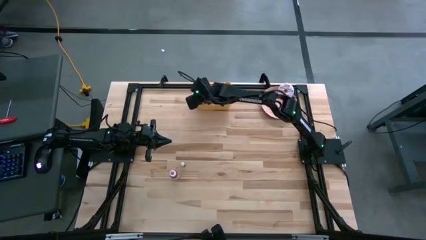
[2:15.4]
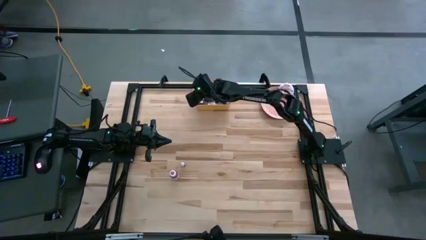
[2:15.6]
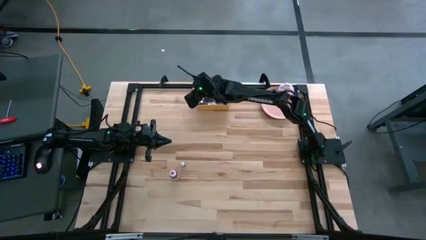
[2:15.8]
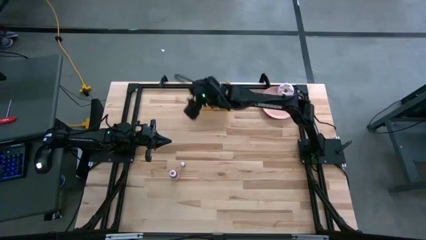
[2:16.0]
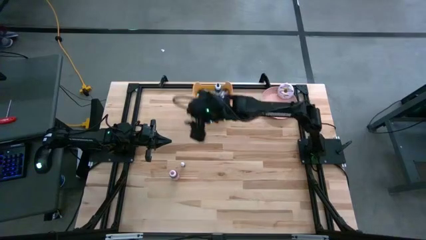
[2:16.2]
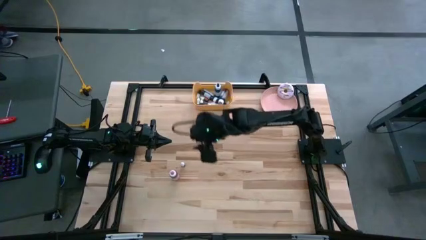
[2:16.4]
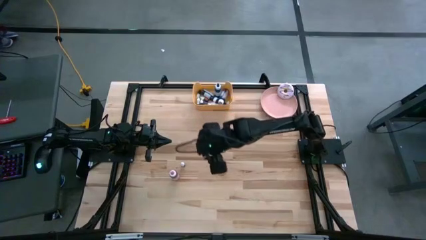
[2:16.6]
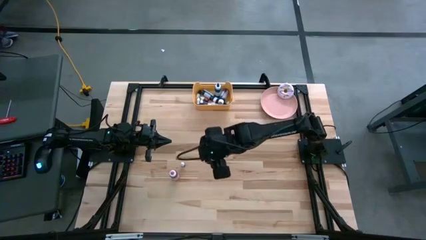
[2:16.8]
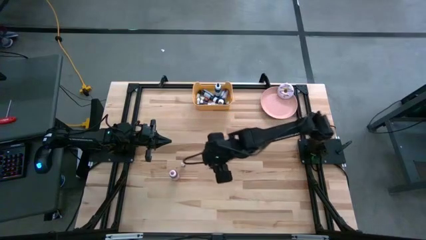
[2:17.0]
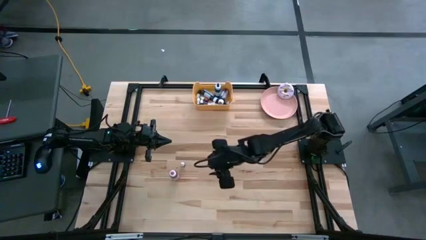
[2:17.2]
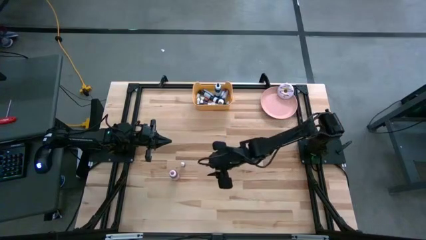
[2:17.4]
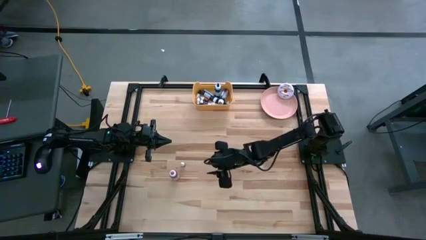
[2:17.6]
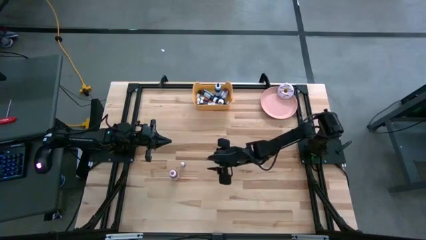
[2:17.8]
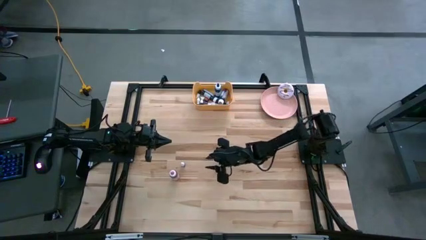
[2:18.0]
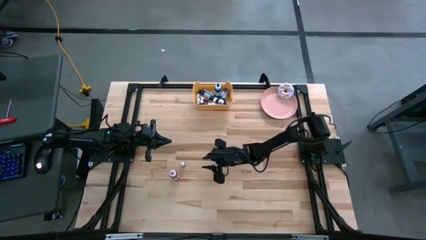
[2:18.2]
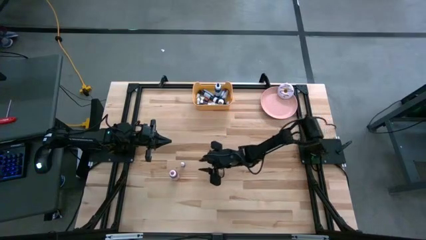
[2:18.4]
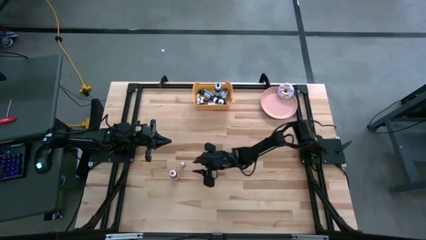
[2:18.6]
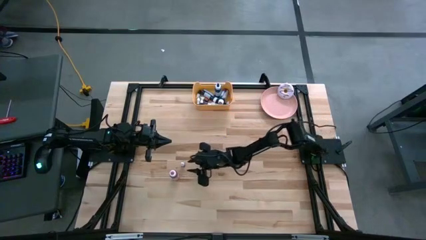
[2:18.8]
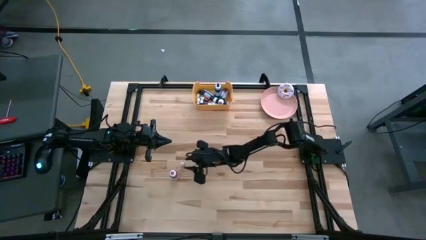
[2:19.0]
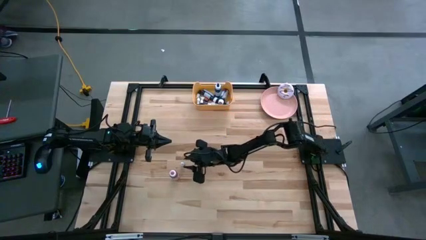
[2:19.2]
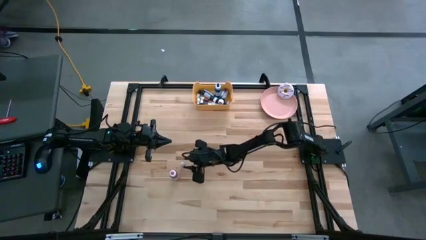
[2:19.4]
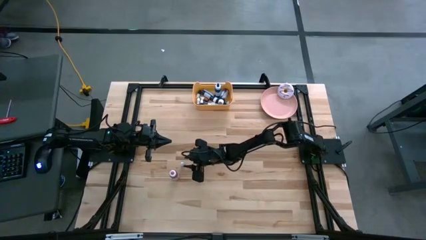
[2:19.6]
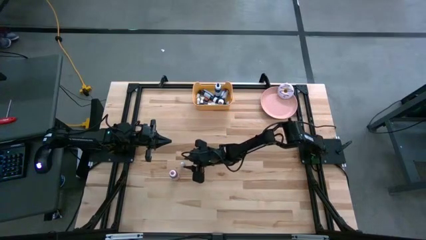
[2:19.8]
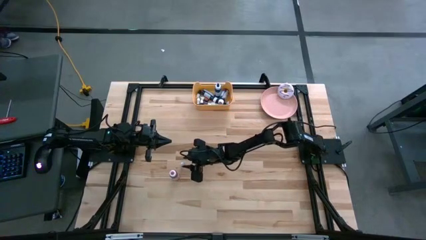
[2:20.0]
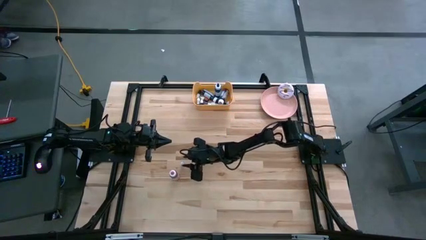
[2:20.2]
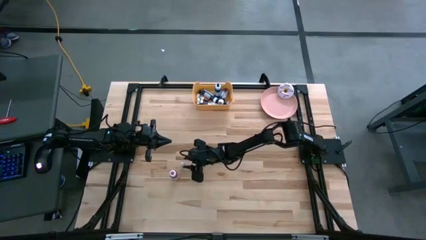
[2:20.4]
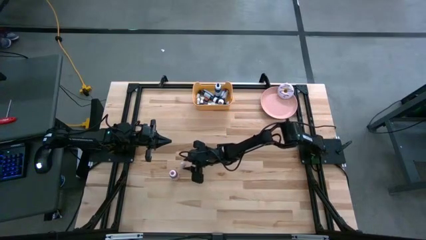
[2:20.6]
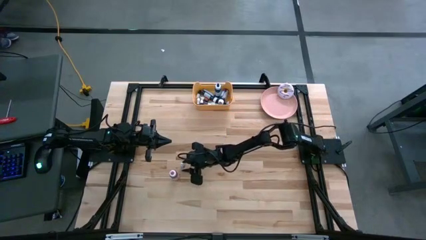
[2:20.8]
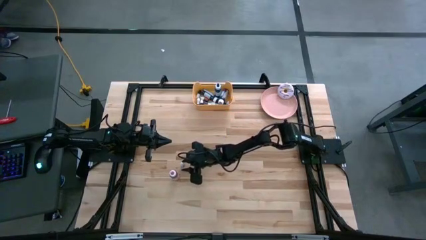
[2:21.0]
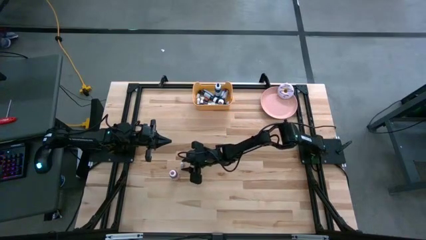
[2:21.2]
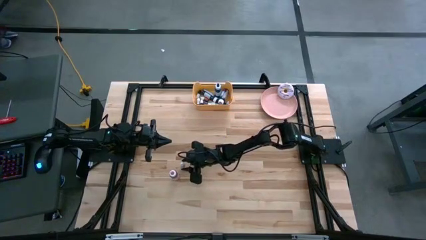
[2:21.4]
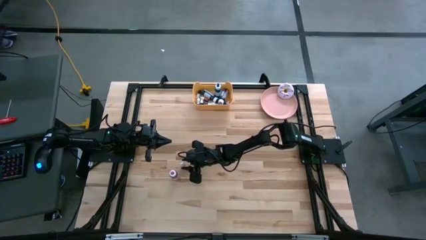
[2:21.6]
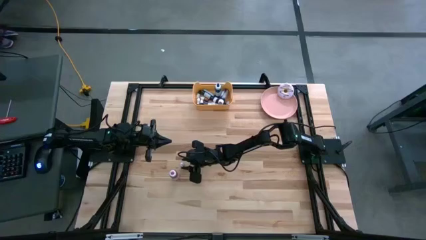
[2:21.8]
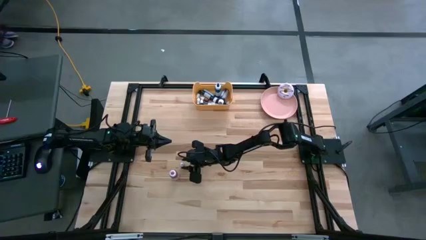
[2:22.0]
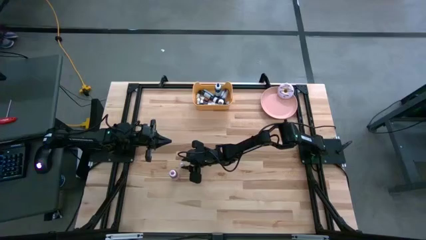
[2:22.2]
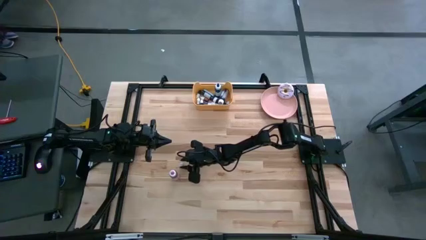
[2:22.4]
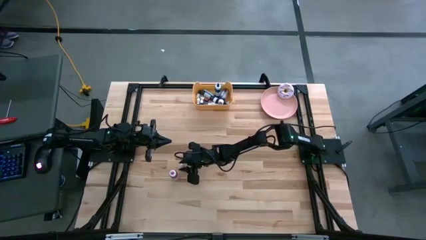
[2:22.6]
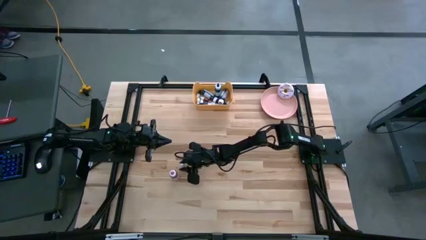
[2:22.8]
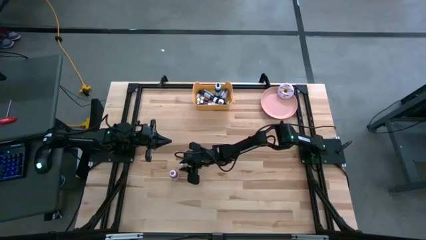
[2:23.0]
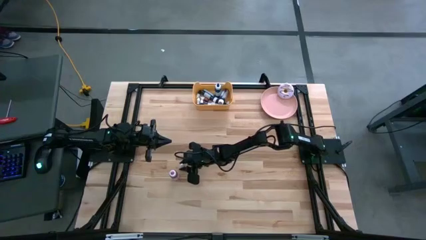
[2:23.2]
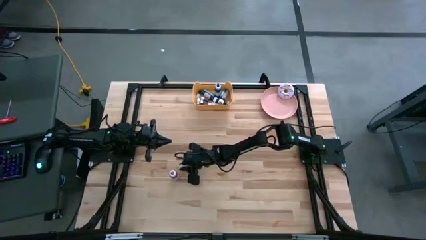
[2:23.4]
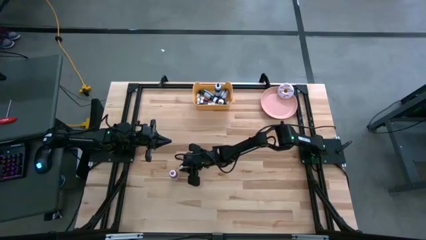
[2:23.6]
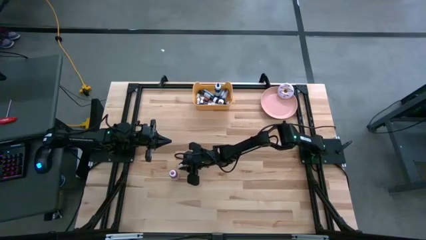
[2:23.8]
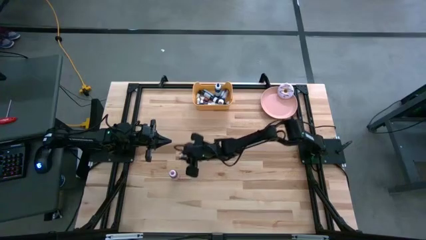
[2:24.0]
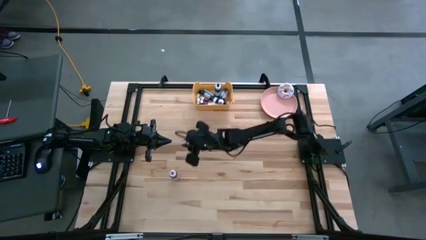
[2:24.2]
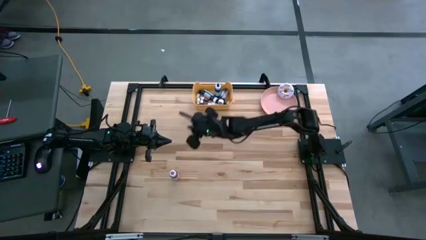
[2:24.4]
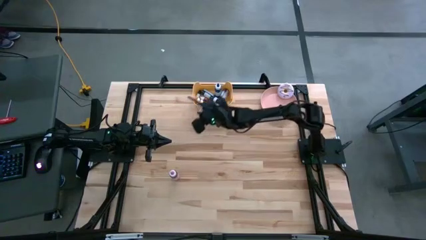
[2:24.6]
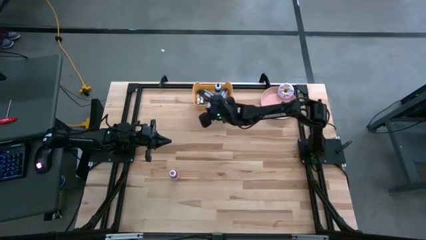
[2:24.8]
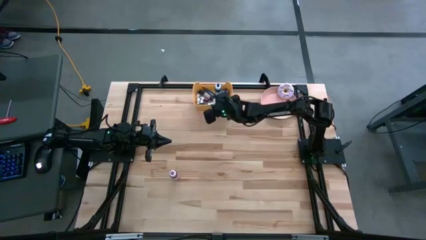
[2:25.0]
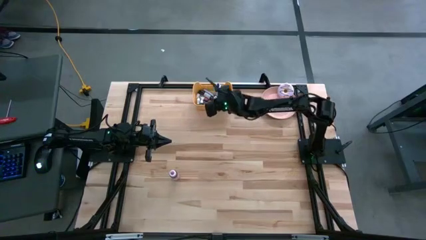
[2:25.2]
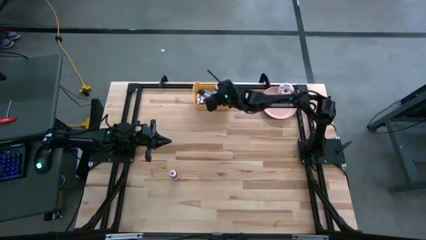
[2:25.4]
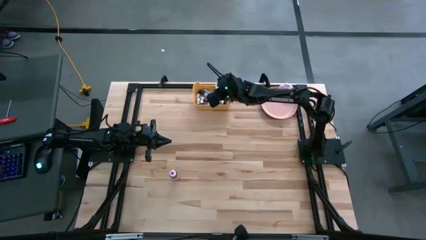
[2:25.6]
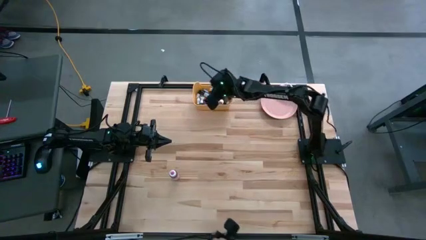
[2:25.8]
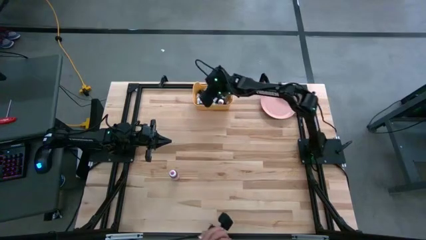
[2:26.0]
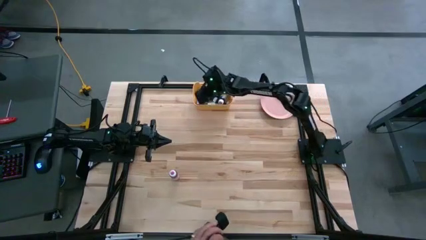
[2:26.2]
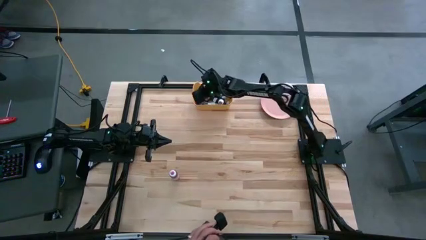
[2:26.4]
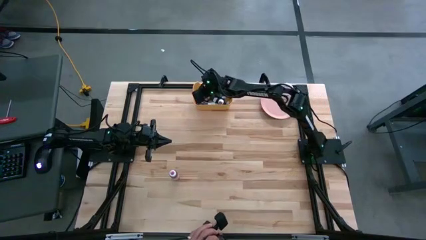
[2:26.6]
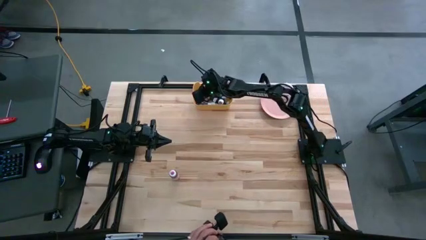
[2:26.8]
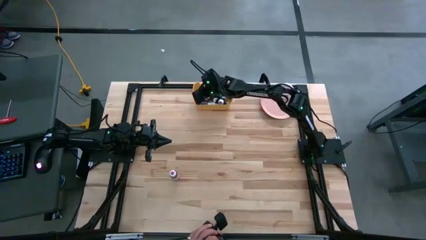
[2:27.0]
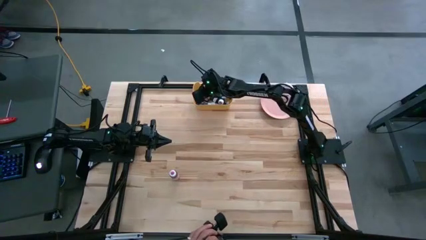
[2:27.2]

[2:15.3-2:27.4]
Task: Pick & Place food coloring
Put the small orange food coloring bottle into the yellow bin

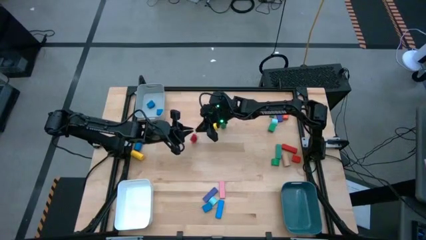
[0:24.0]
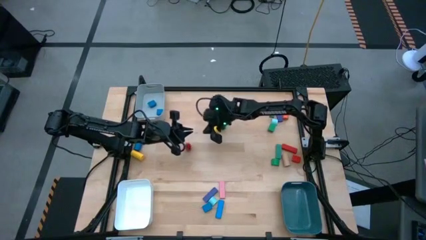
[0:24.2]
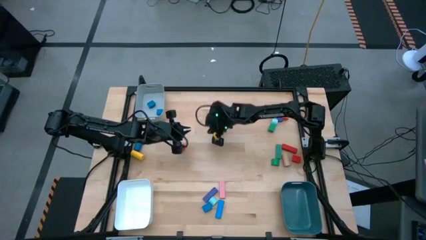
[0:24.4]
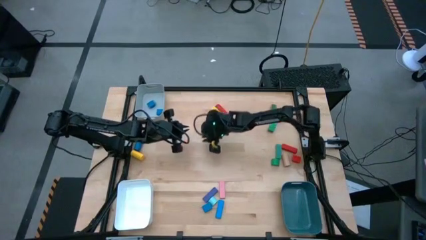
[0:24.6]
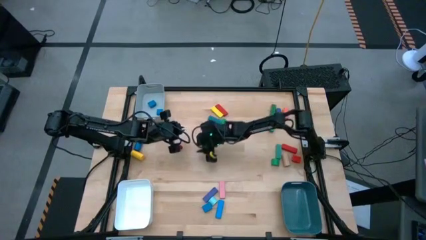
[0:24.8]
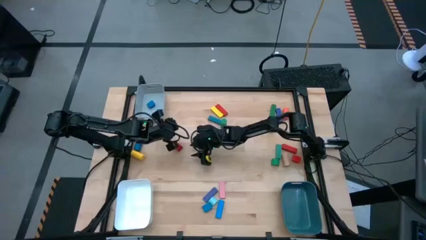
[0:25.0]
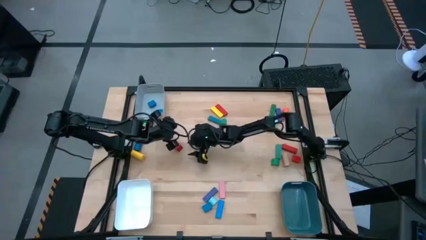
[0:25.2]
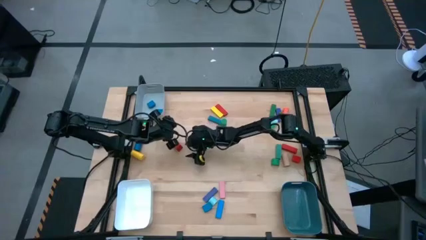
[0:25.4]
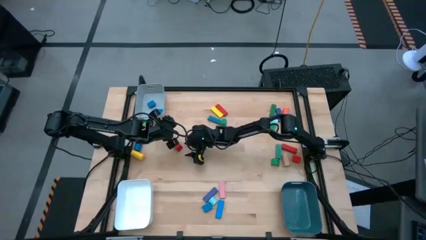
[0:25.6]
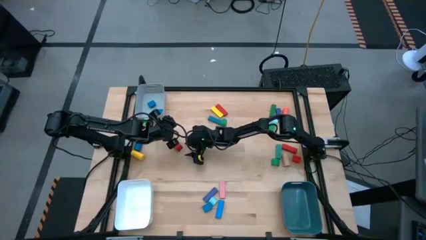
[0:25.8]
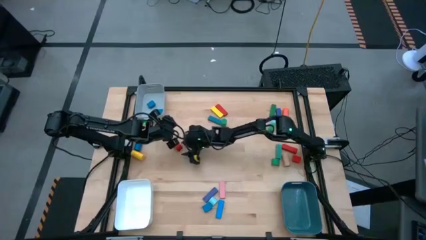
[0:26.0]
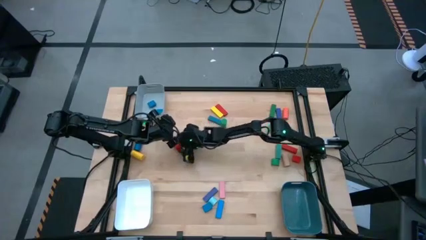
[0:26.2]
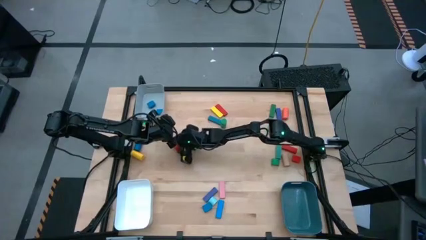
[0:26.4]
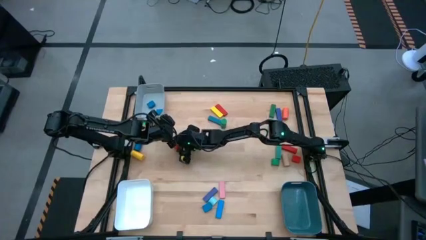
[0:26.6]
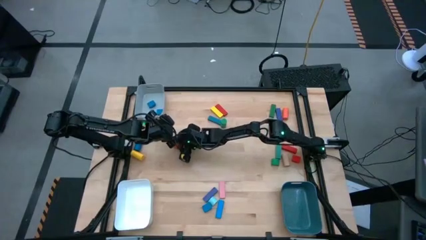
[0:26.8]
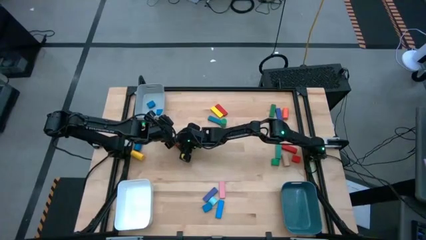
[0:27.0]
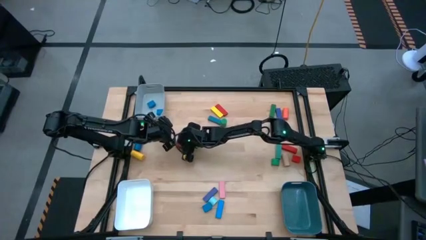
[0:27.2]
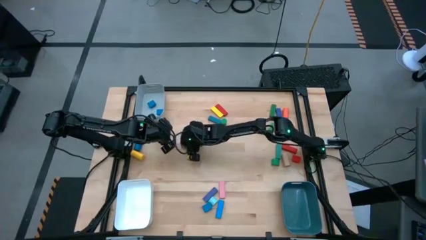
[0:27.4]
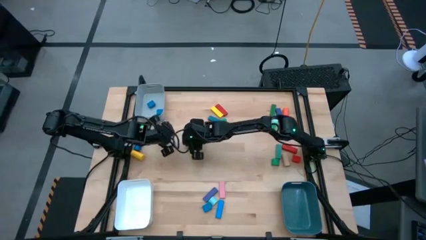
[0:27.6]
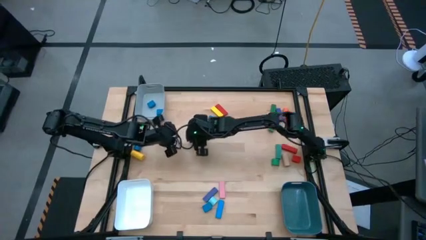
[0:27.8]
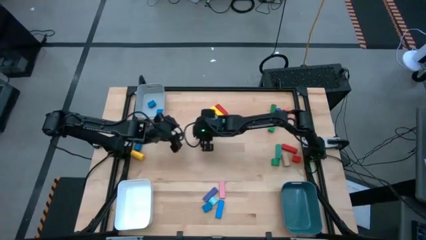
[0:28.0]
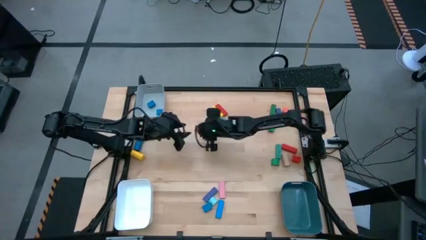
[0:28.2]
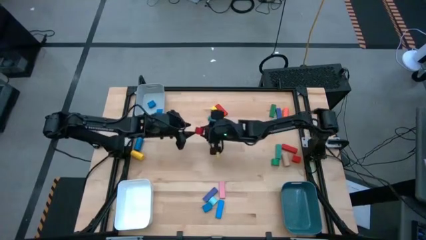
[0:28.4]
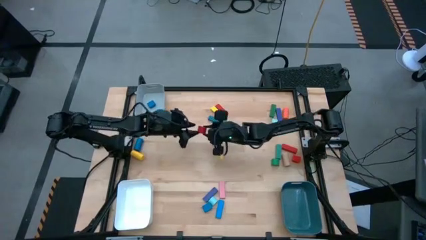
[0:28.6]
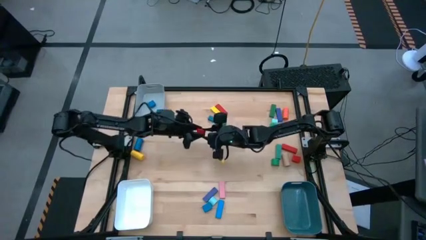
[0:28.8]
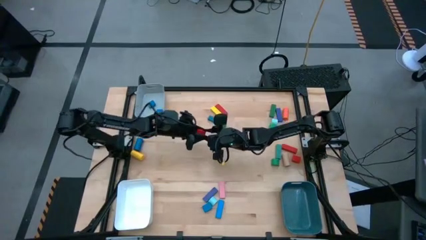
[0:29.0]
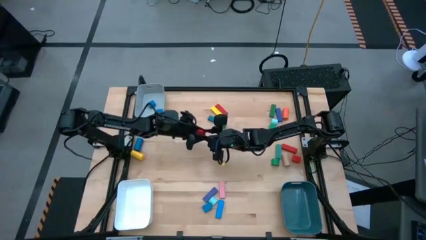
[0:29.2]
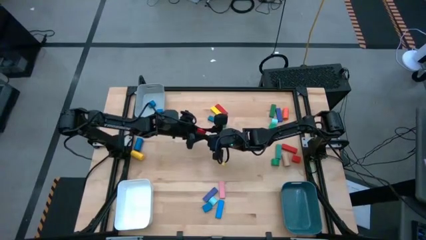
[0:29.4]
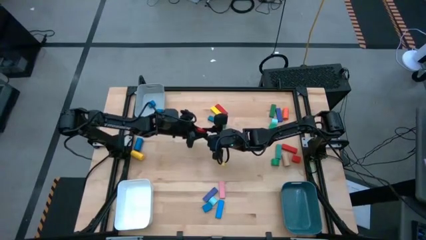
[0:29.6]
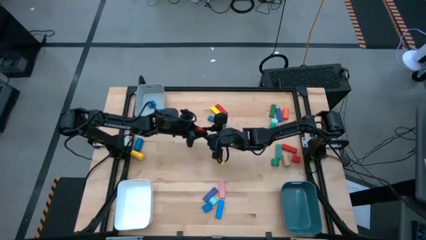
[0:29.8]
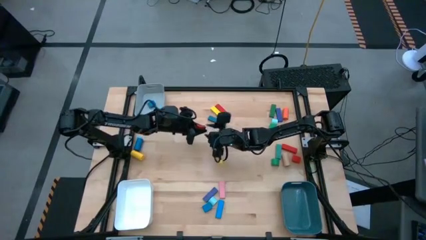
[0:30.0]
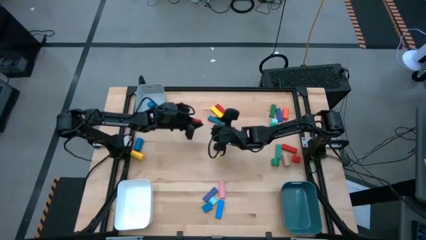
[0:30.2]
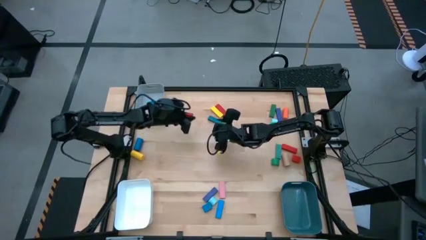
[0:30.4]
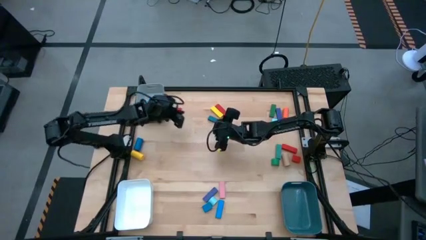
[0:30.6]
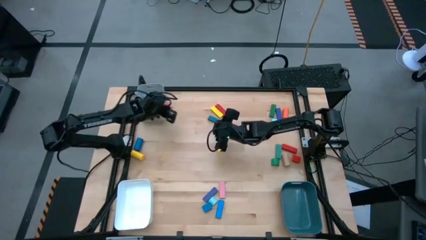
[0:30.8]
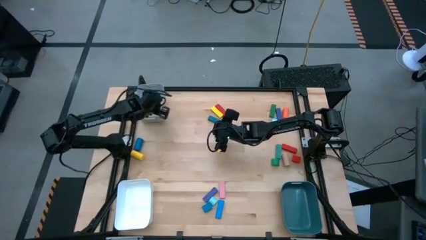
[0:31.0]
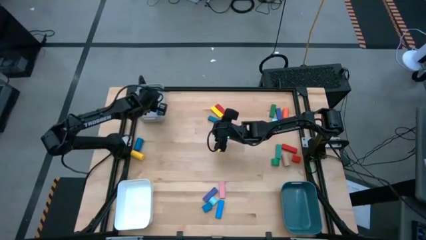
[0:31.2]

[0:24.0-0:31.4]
Task: Sort blocks by size
Put the red half-circle block into the gray bin
